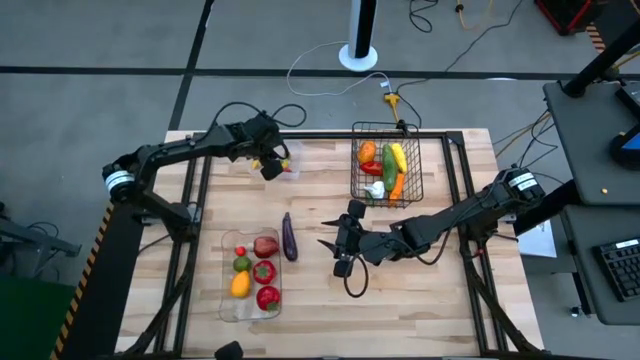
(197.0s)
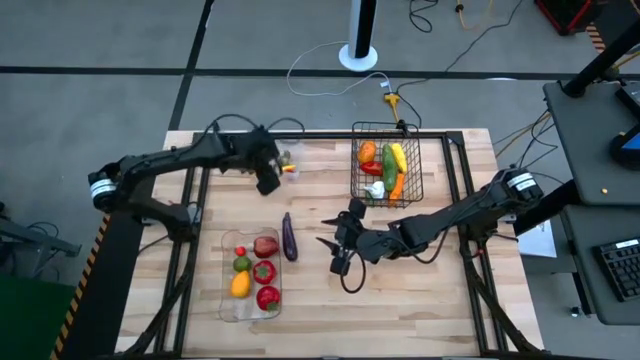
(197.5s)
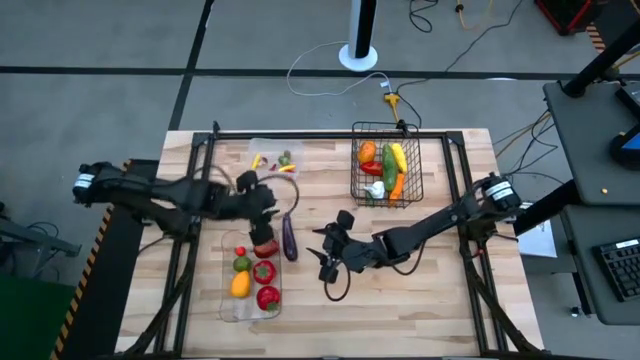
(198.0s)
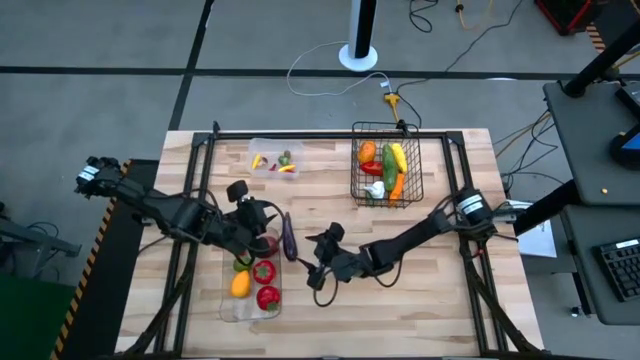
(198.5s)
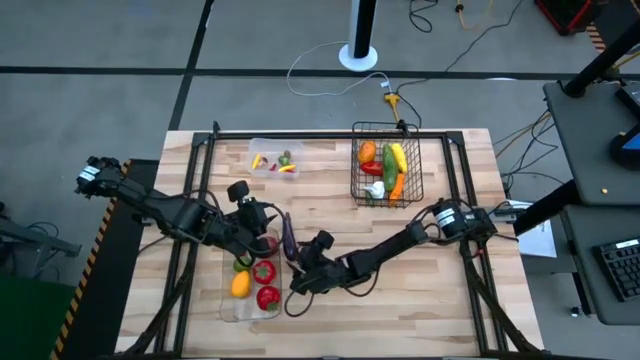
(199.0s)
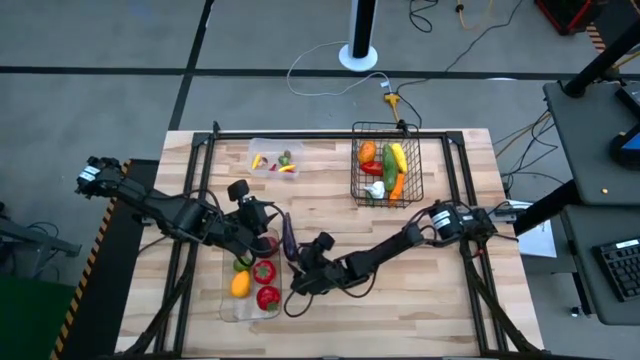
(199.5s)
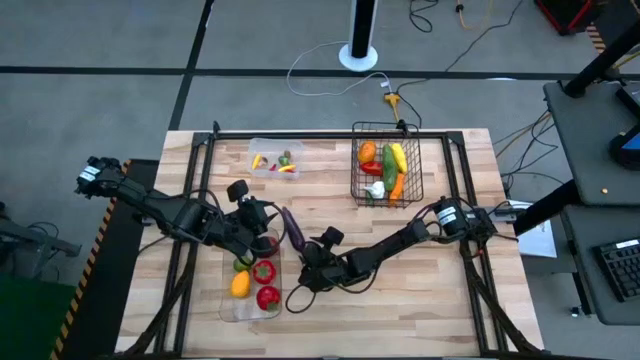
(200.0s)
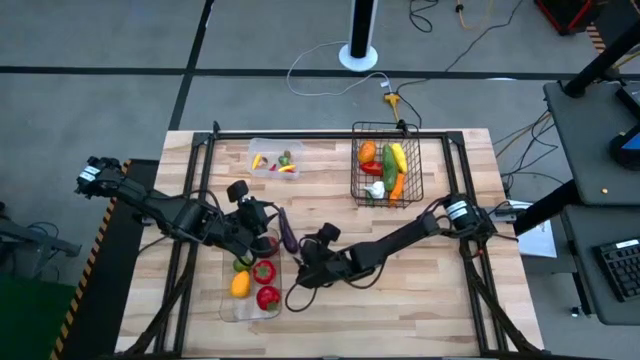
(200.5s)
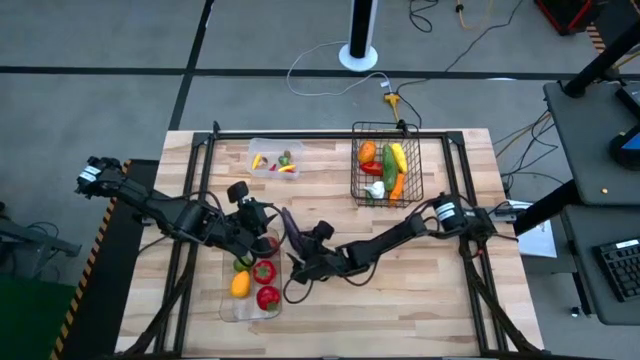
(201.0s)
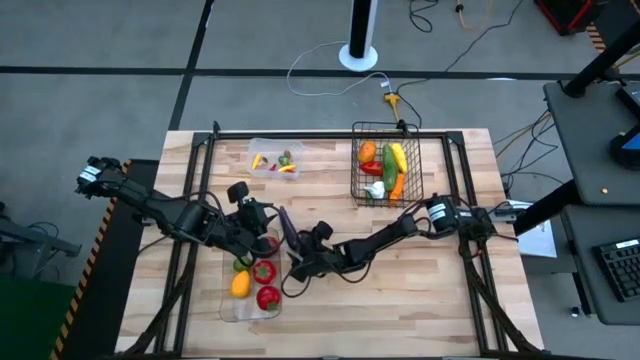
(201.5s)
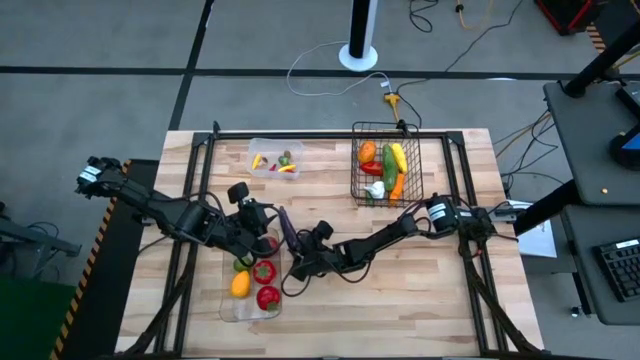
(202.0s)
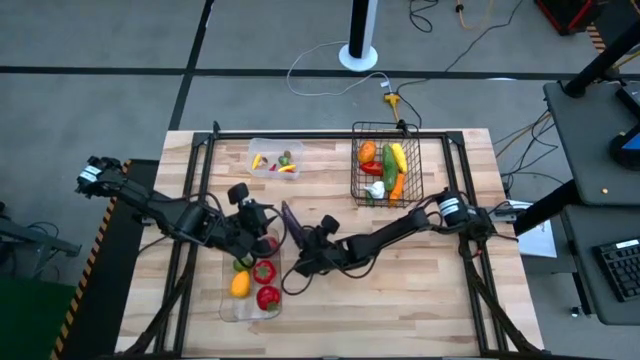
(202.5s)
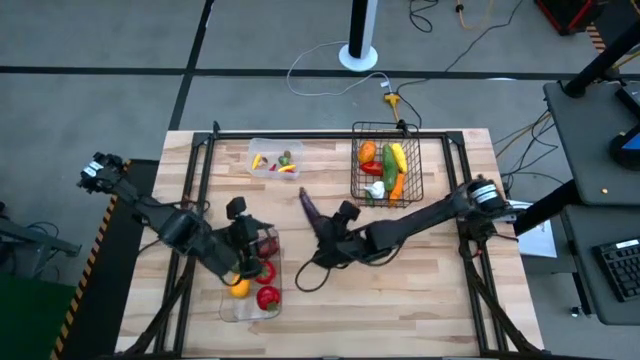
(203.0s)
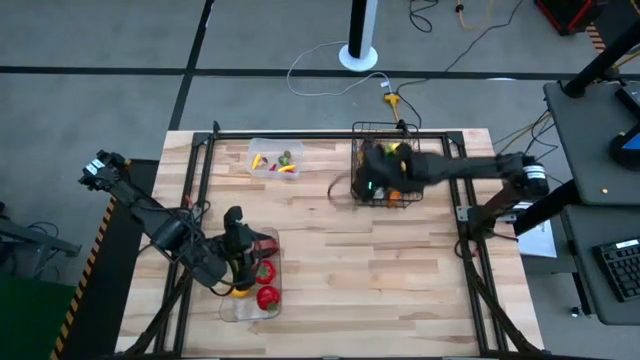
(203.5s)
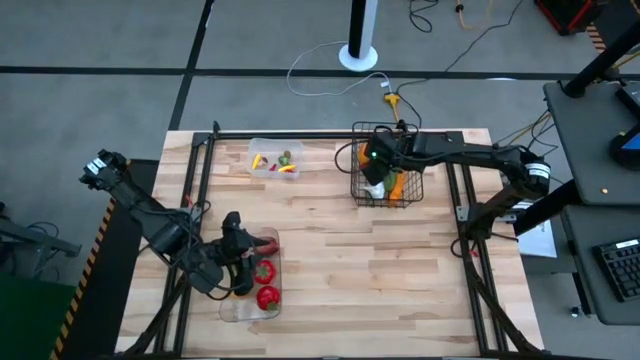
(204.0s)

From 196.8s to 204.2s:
Task: Sort produce into baskets
Put the eggplant into the wire basket

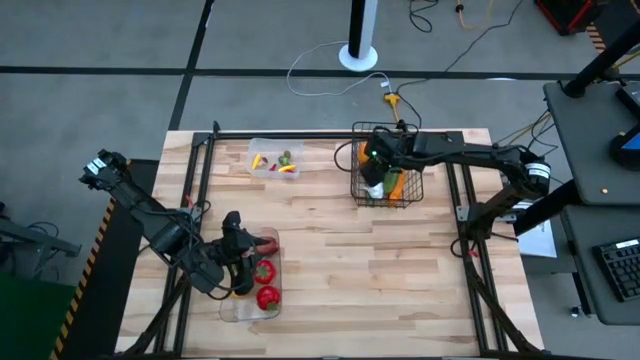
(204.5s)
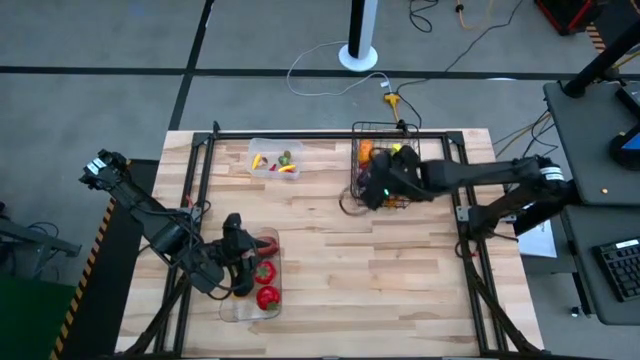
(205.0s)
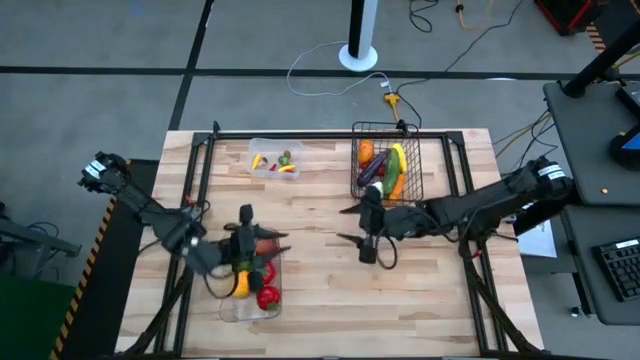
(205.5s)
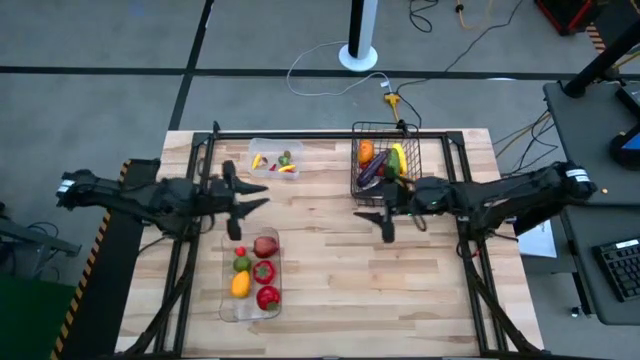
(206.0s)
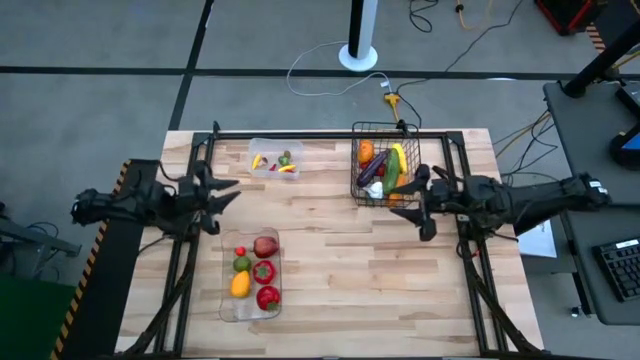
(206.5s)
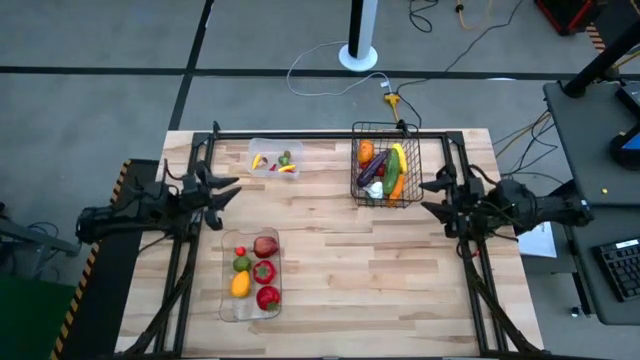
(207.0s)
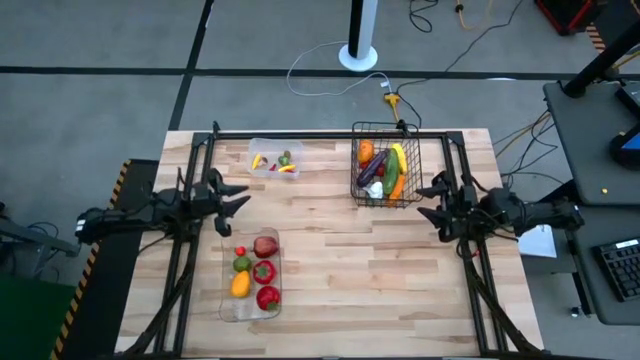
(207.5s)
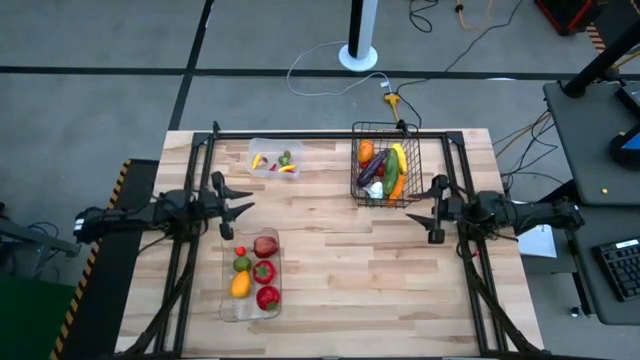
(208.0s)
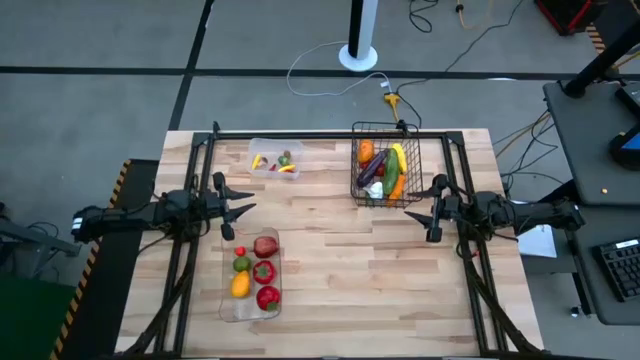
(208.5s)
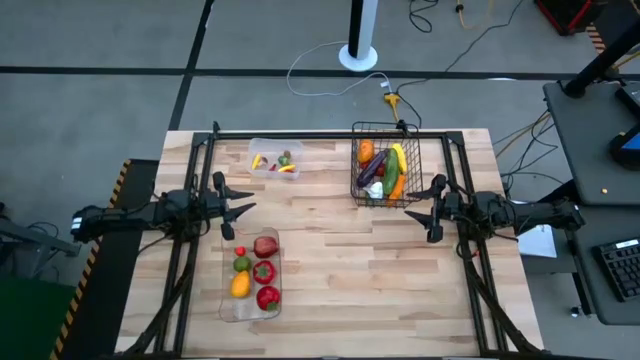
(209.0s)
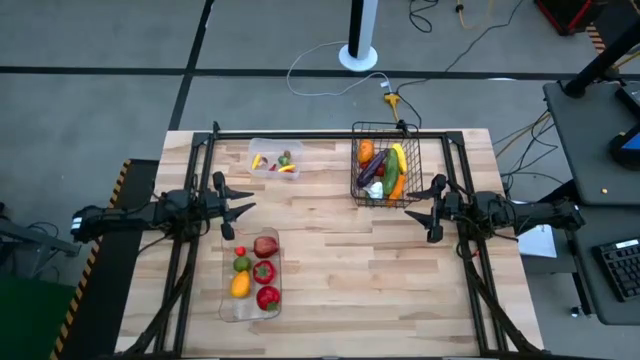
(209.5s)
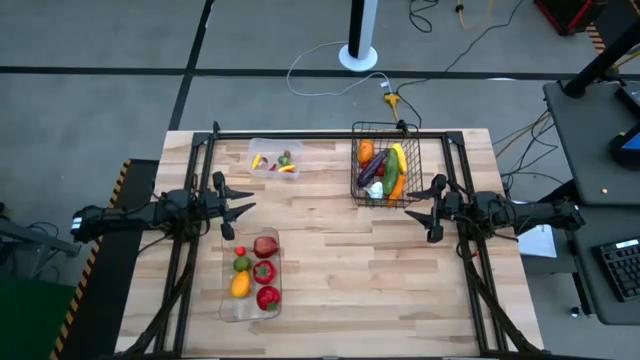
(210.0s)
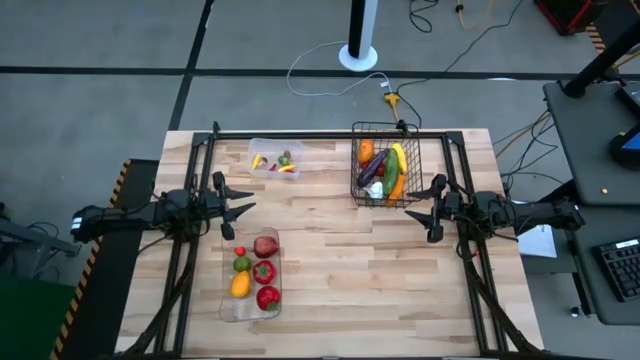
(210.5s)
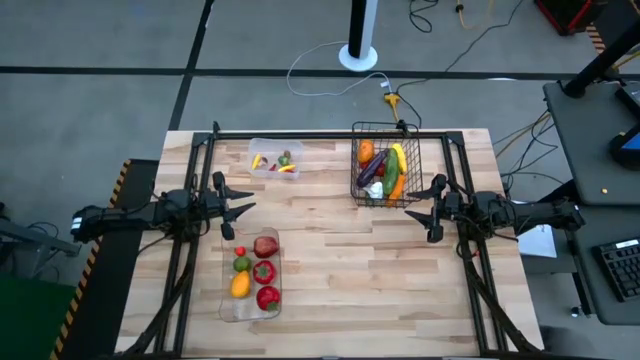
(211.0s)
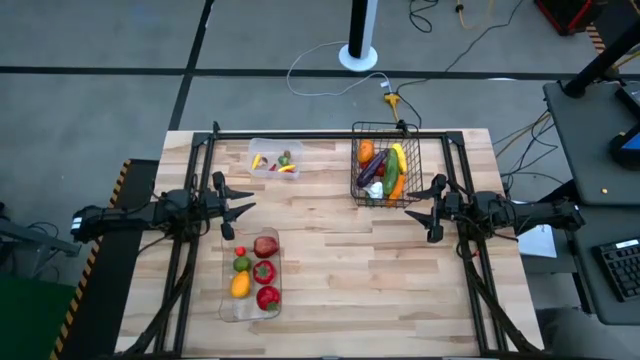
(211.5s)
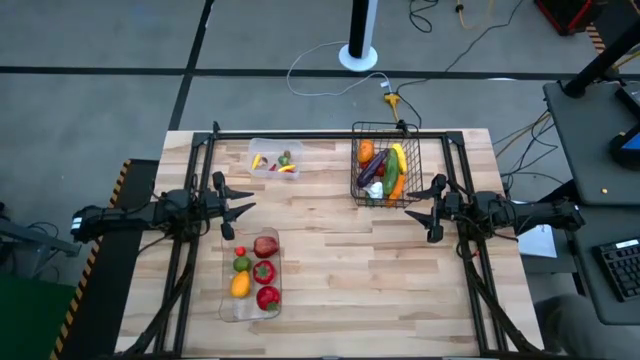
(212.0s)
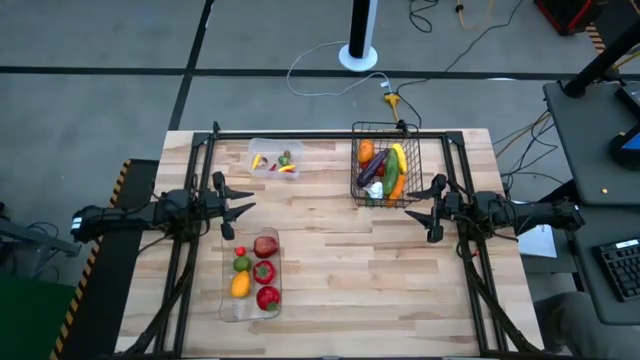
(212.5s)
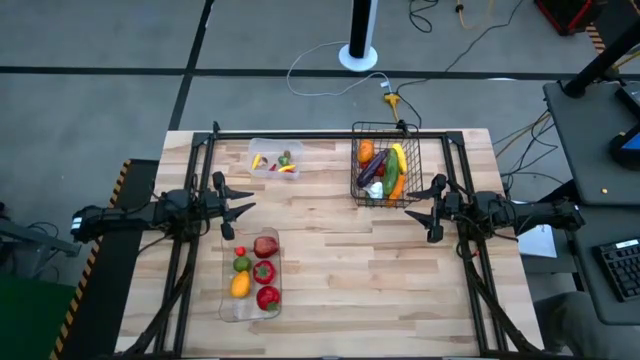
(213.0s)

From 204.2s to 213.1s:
Return to Home Position

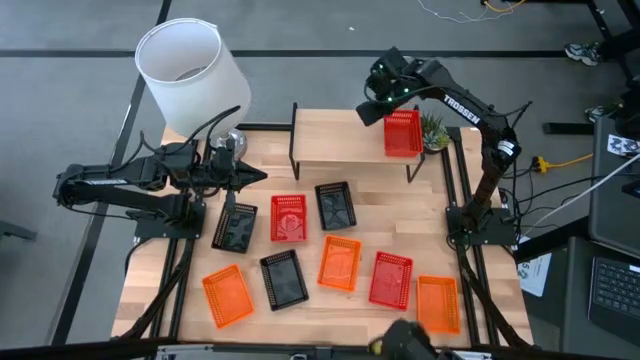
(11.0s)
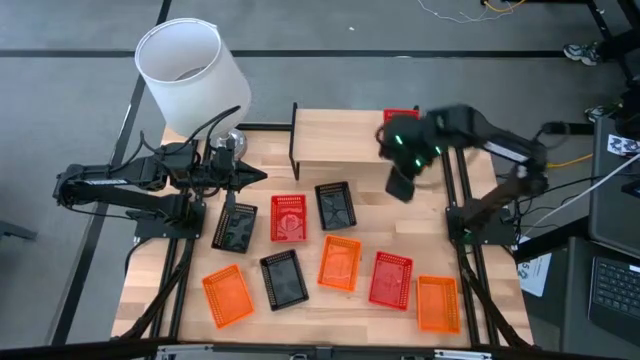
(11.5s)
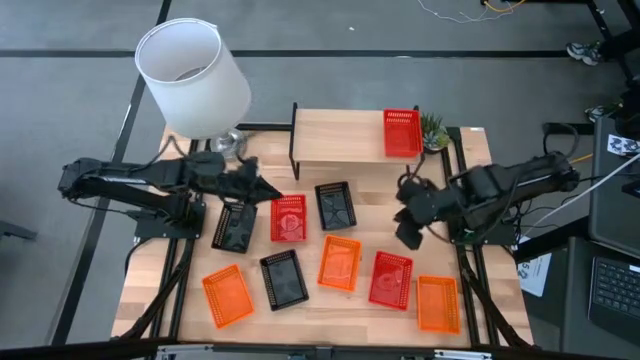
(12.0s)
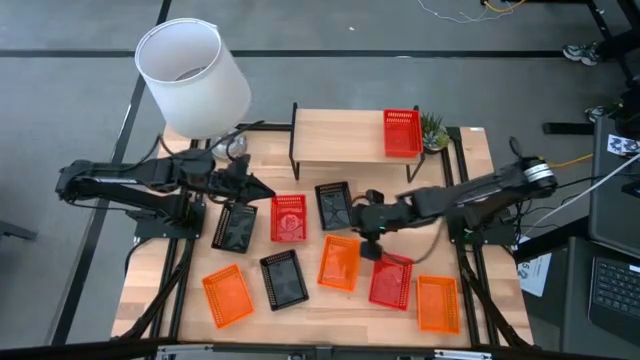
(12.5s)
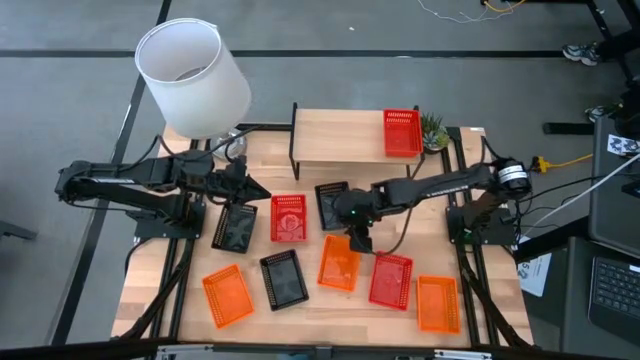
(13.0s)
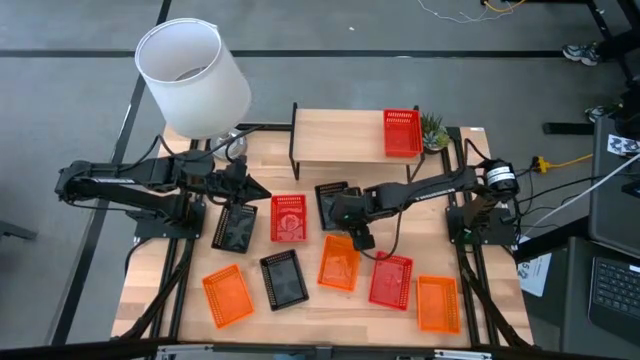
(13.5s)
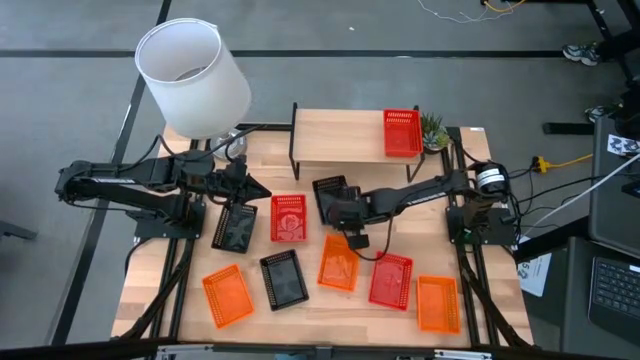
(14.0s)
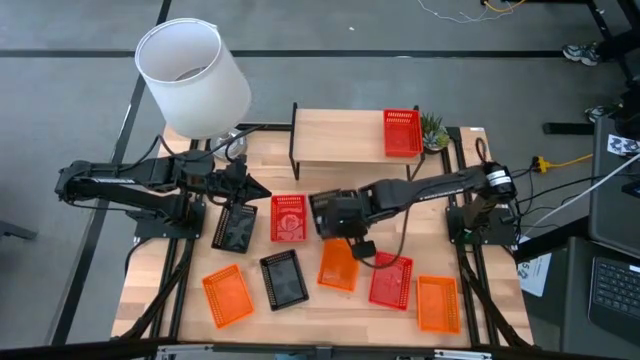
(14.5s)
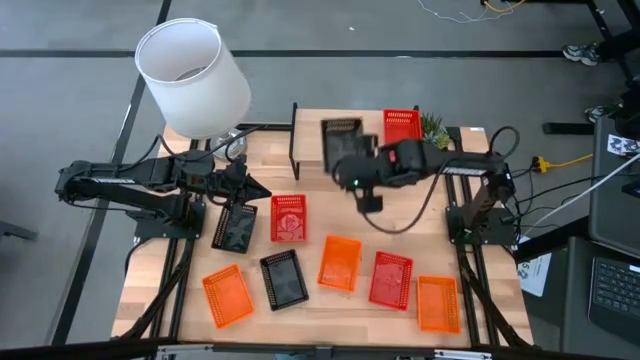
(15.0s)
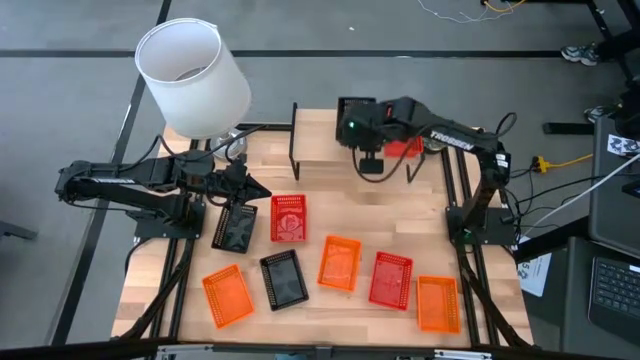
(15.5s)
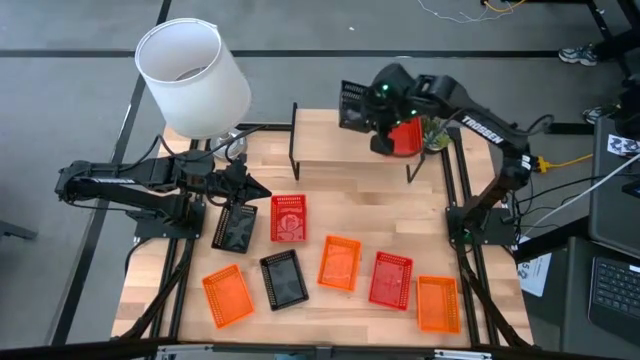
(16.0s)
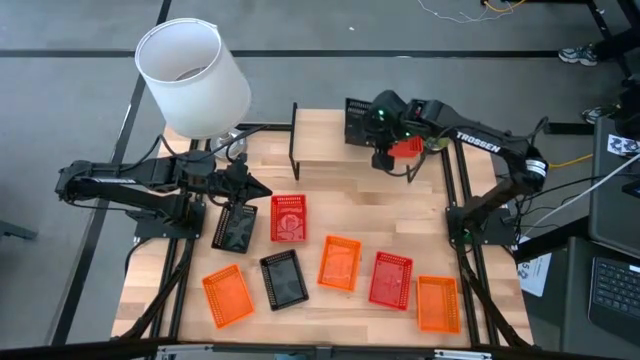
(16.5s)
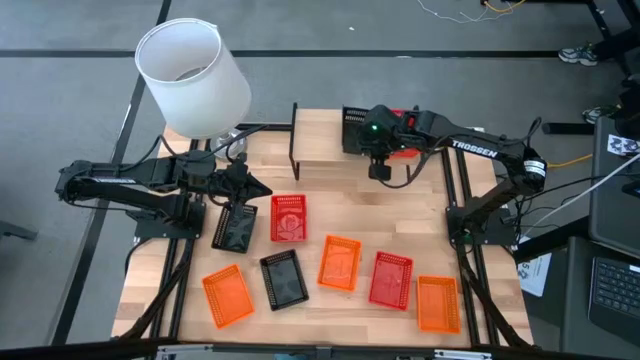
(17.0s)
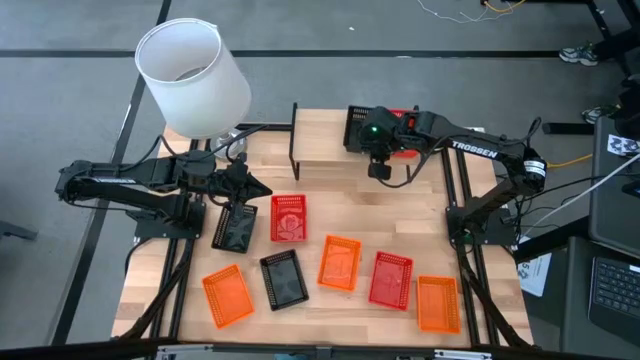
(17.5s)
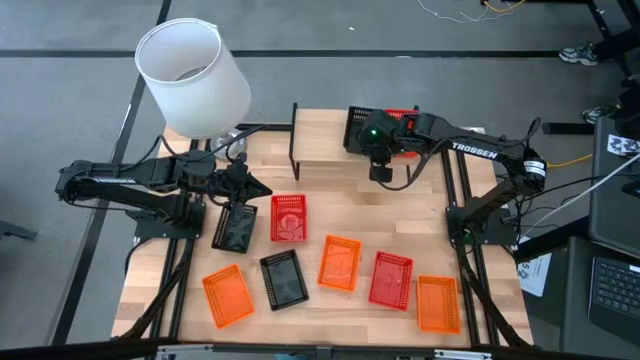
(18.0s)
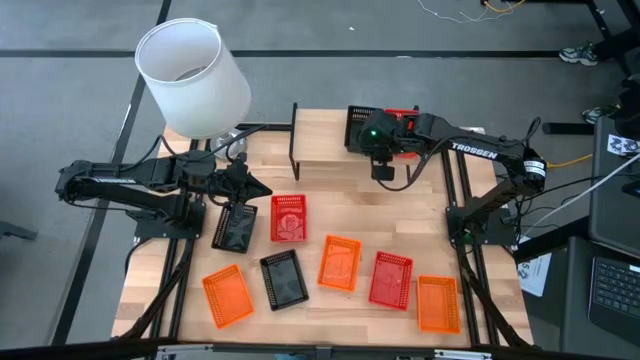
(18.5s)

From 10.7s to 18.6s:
Task: Stack baskets on shelf by color
Put the top right black basket on the shelf
